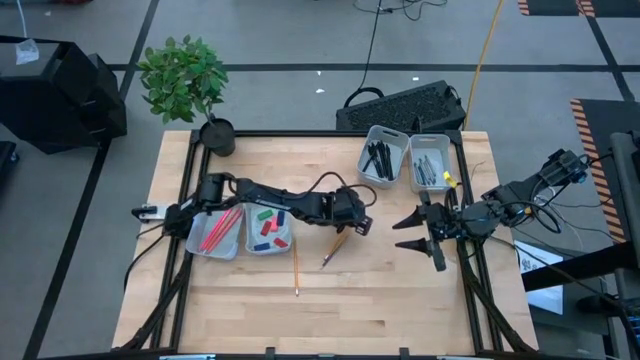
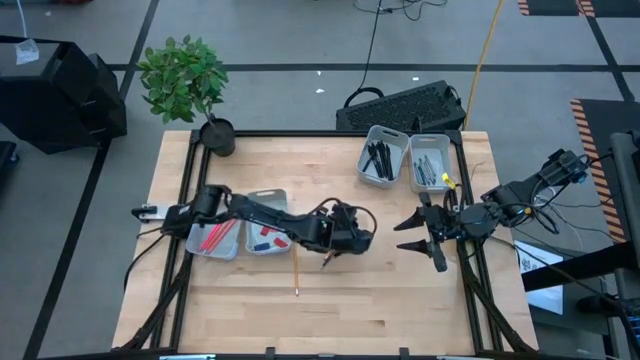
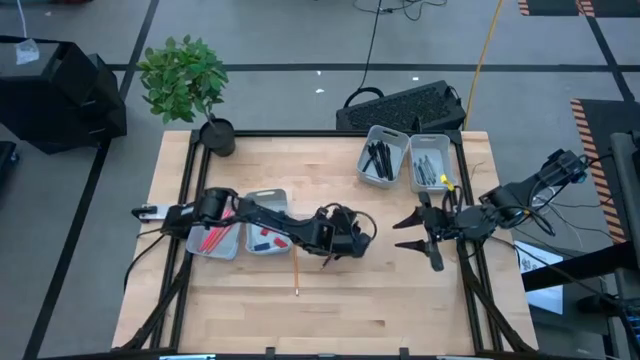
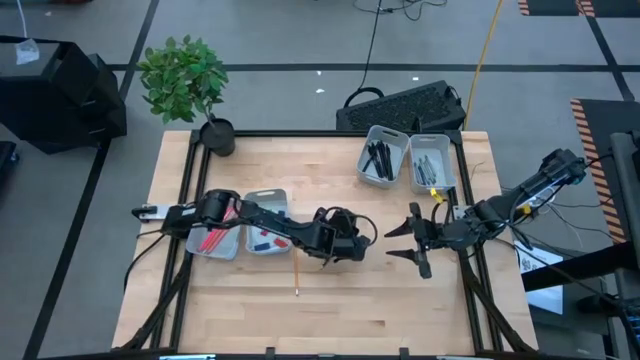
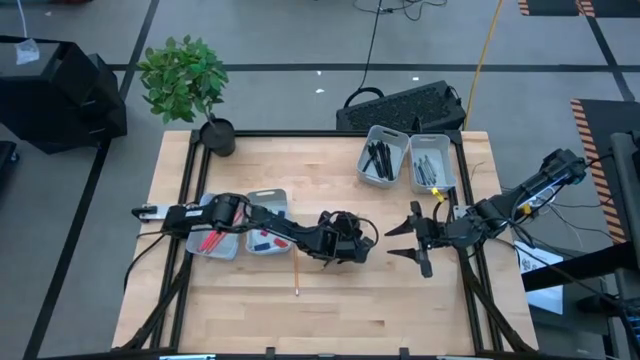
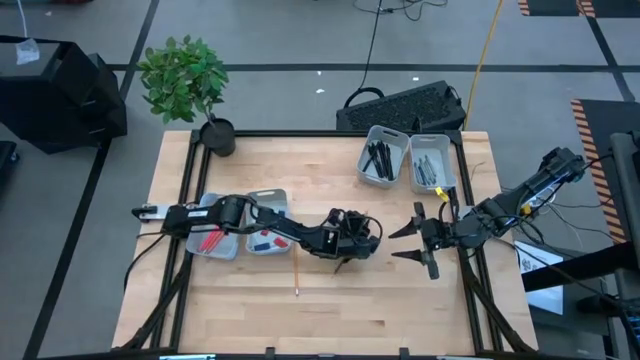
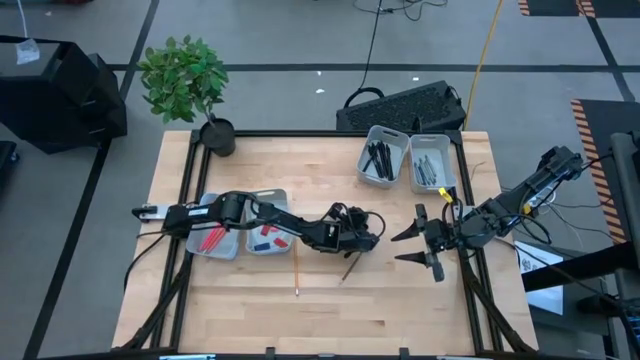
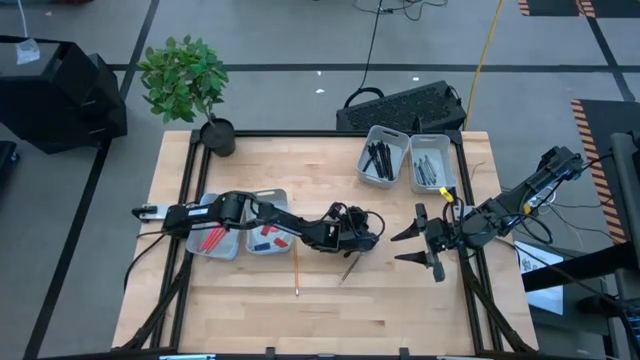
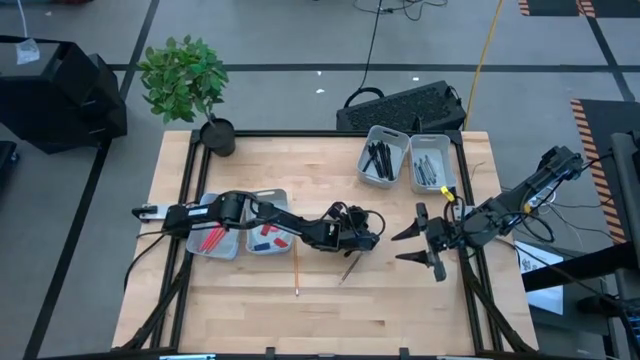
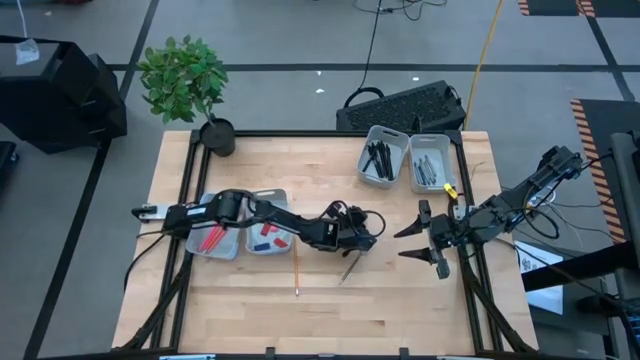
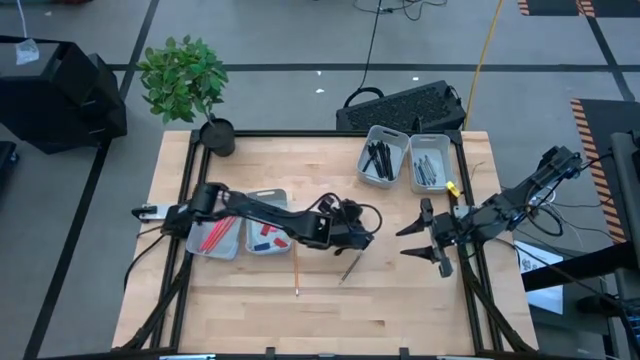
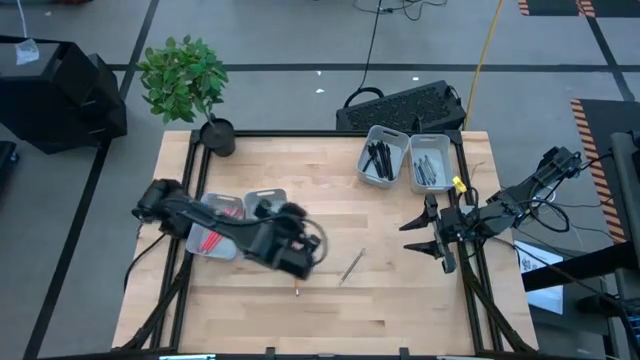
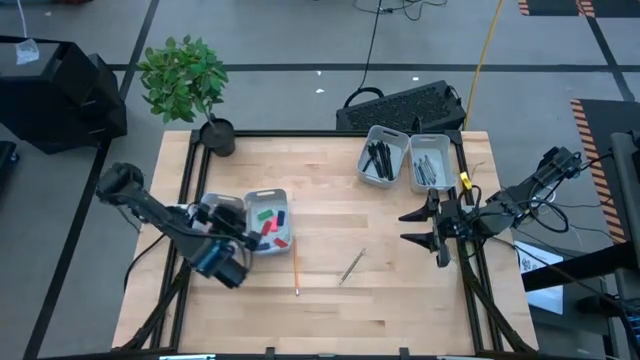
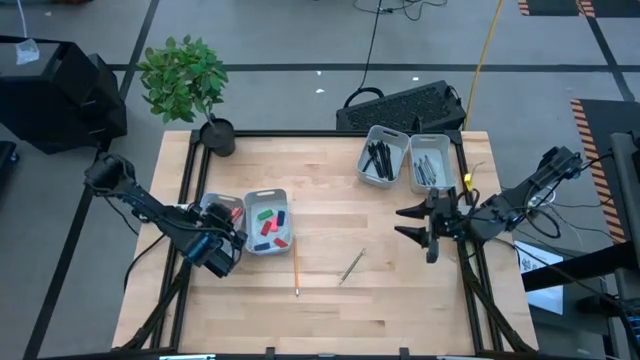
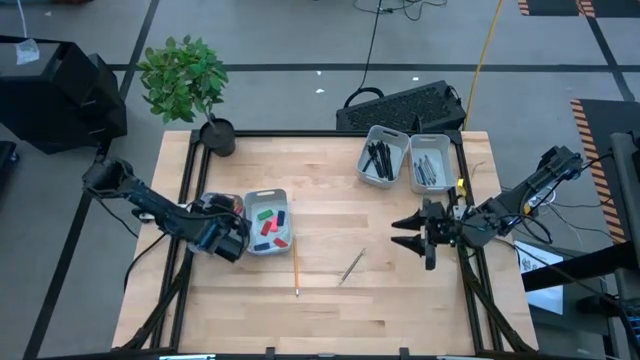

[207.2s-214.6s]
Task: Sort crayons/erasers/pens/pencils in bins
Put the yellow pencil into the bottom left gray bin

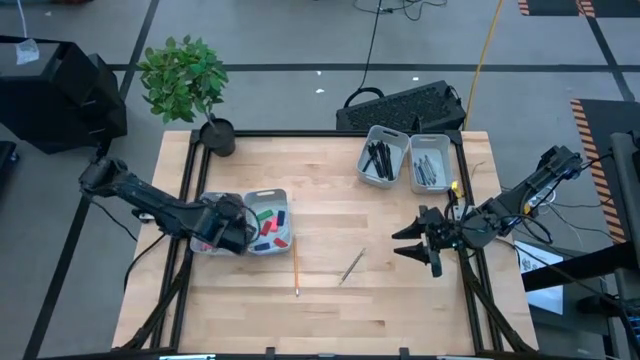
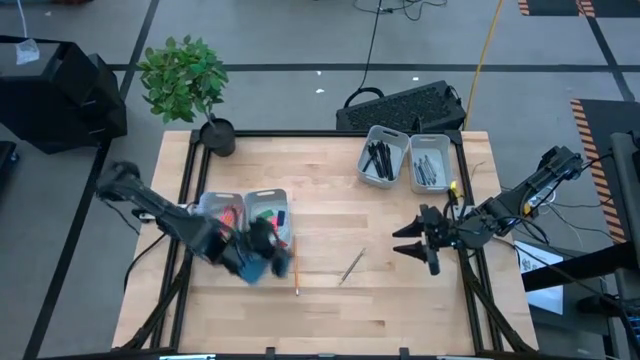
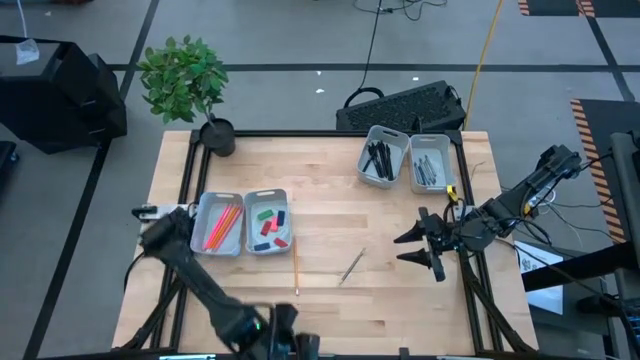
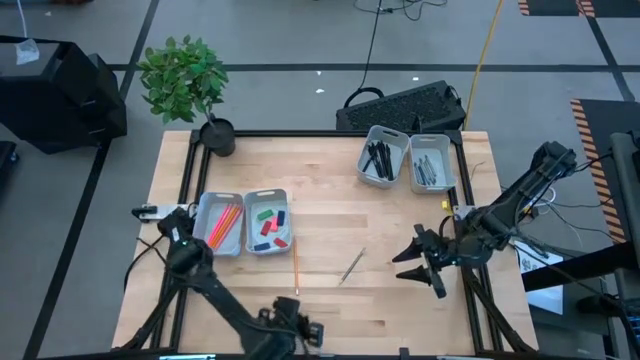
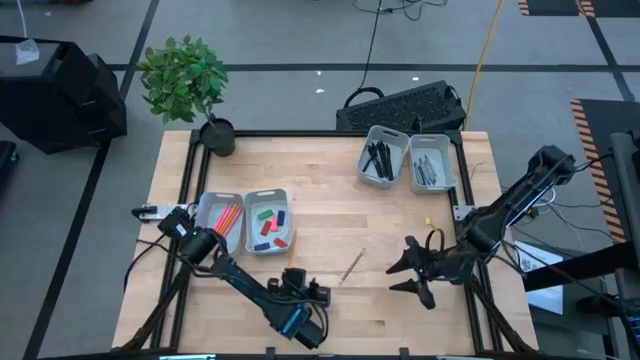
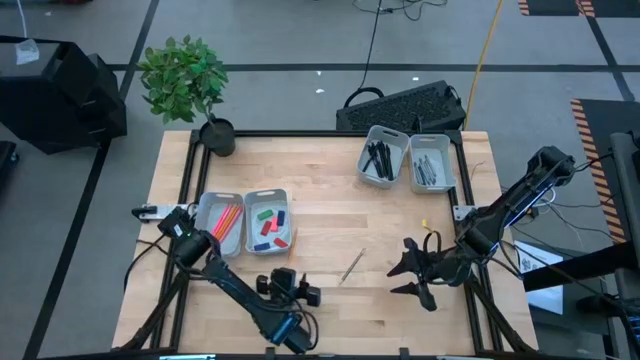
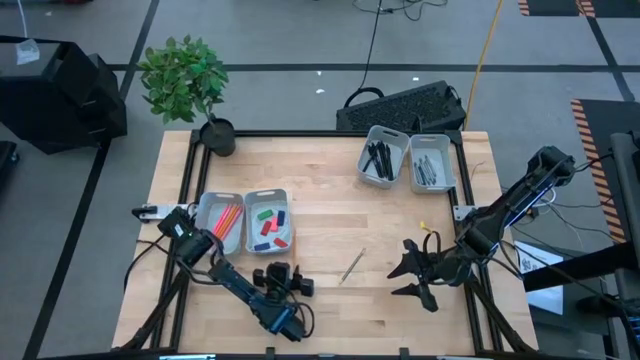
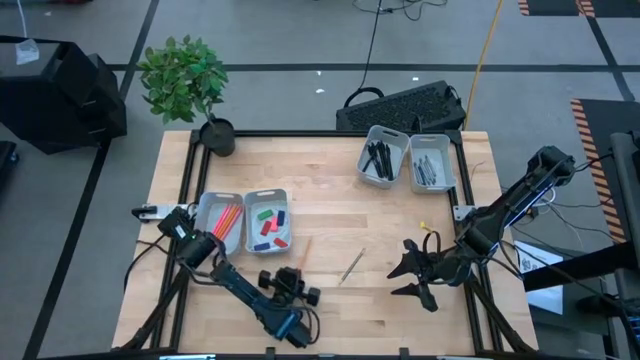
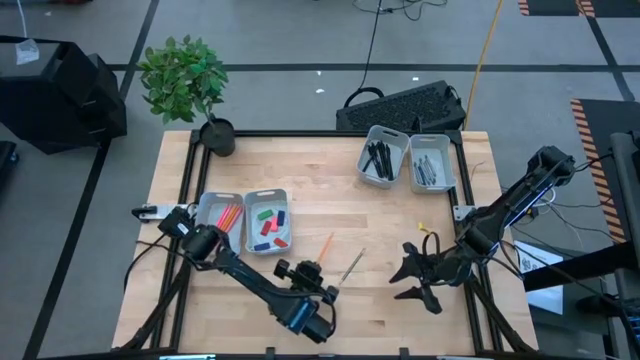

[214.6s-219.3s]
Put the yellow pencil into the bottom left gray bin

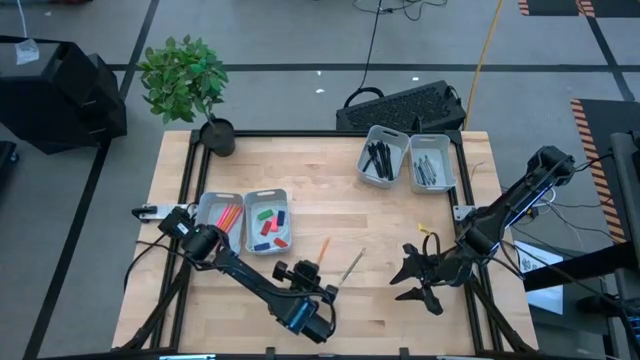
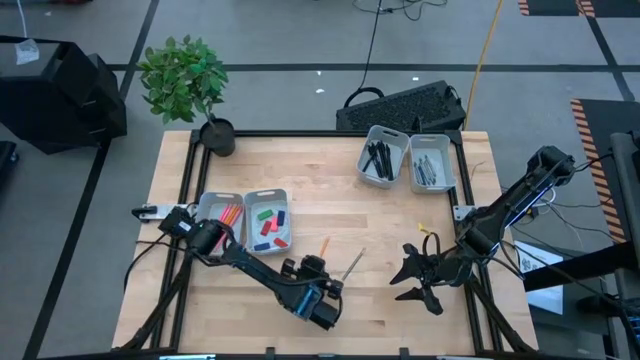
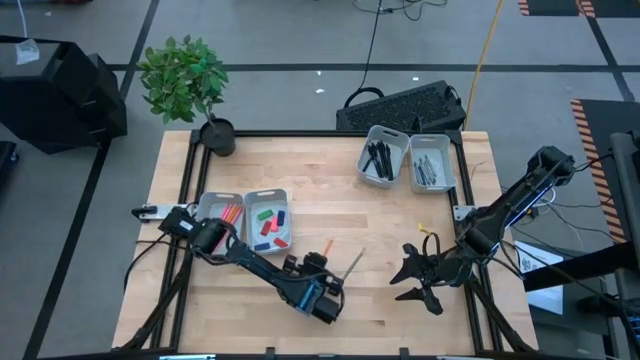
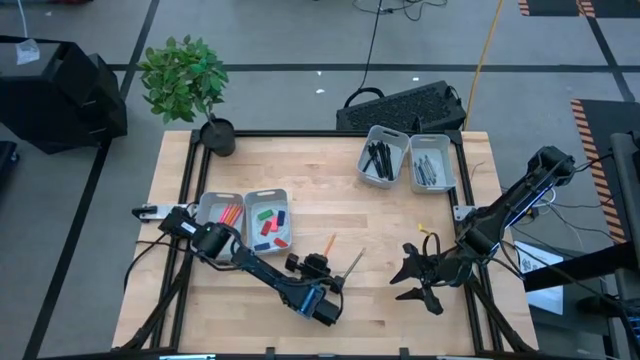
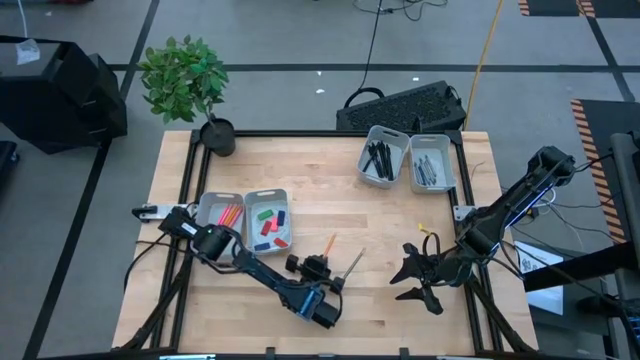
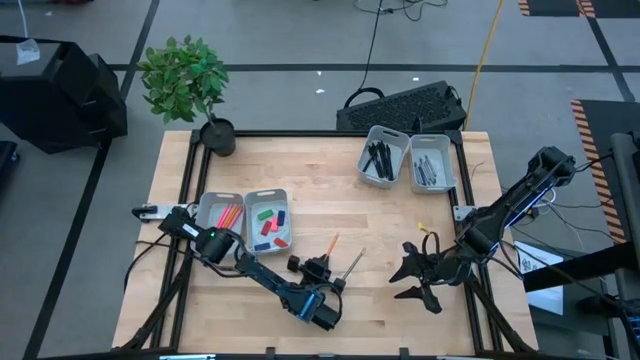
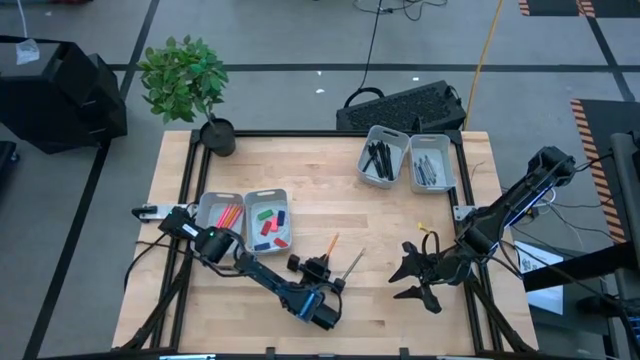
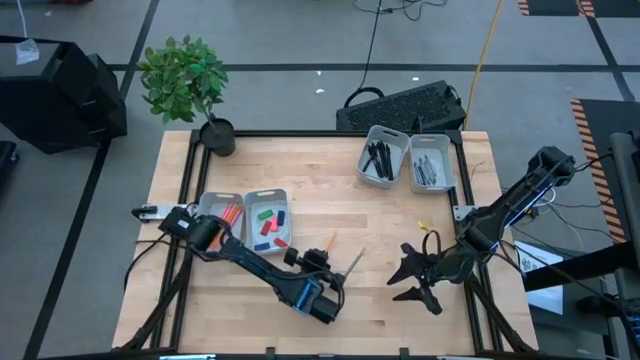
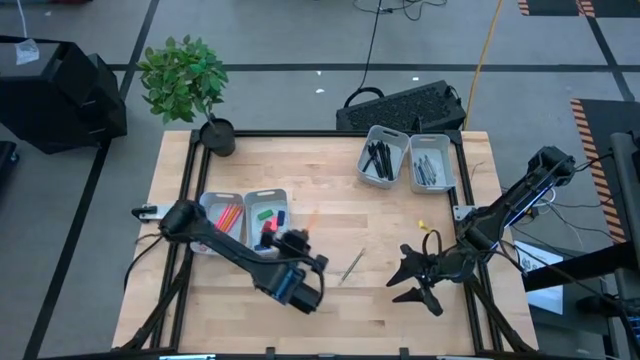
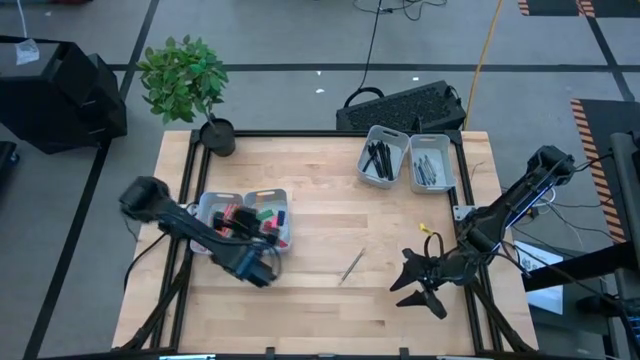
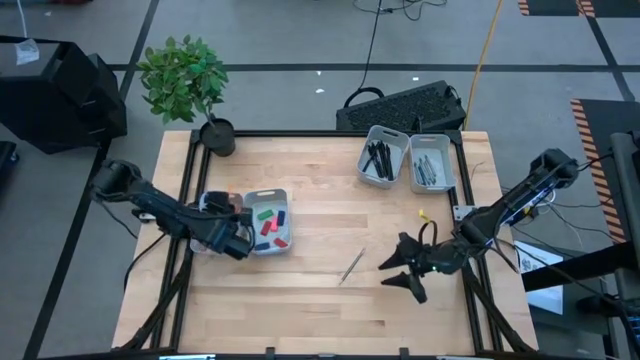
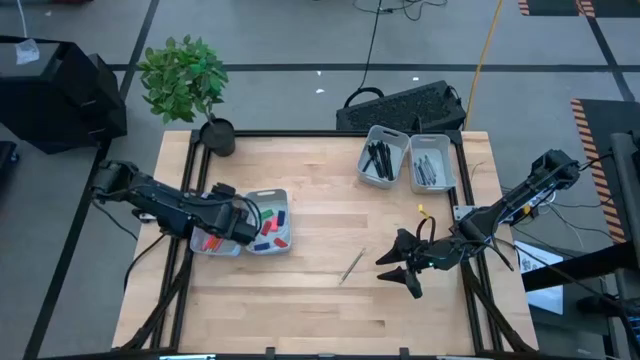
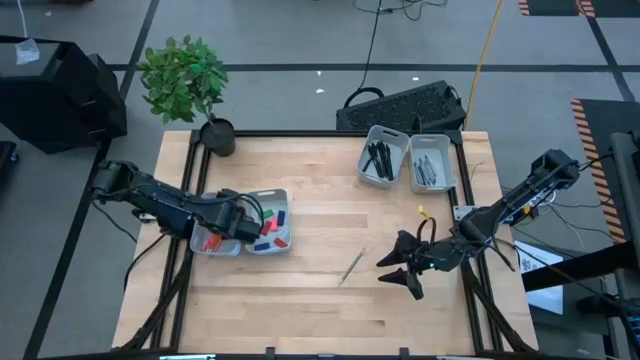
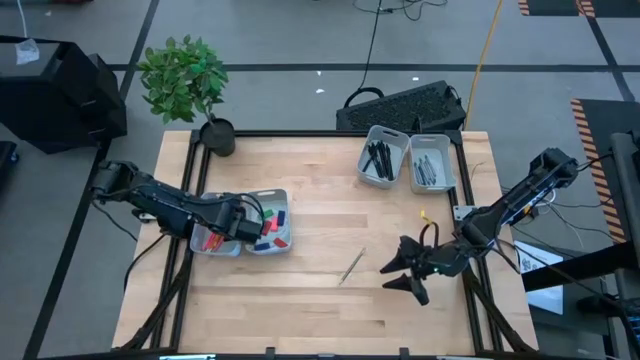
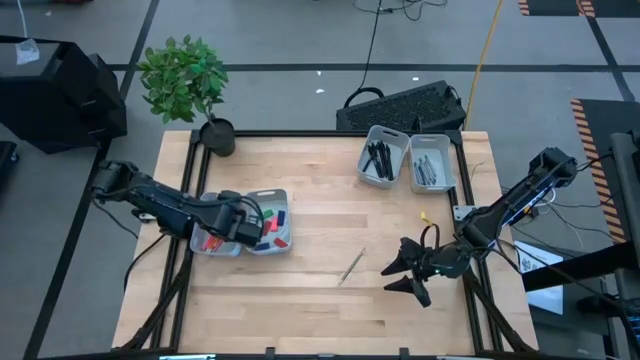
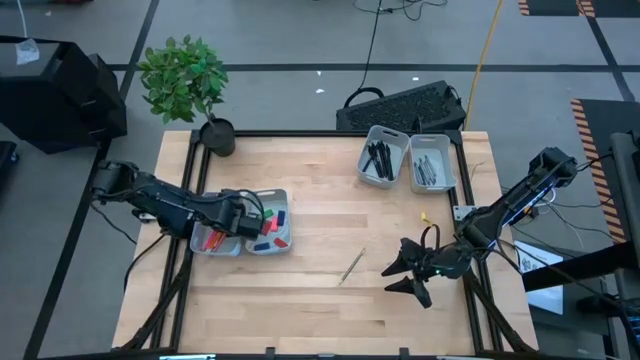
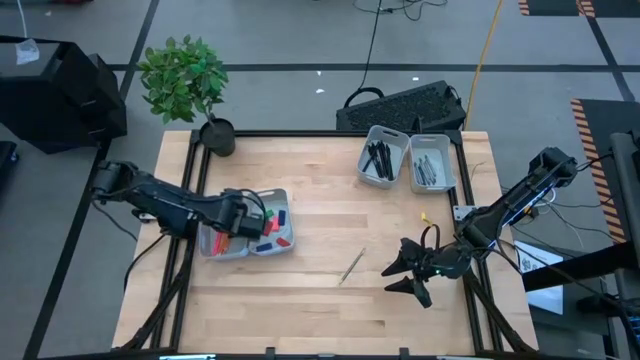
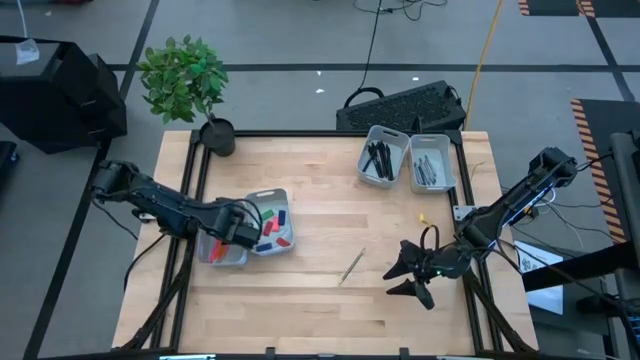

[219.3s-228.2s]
Put the yellow pencil into the bottom left gray bin

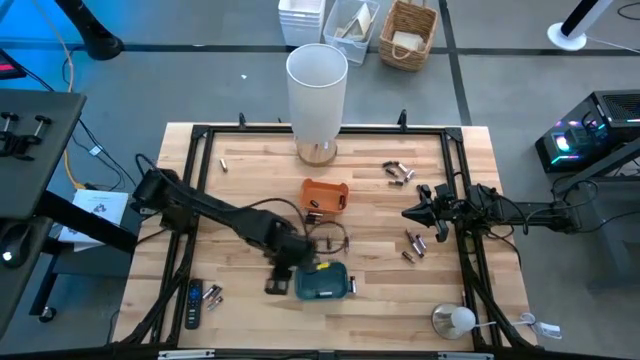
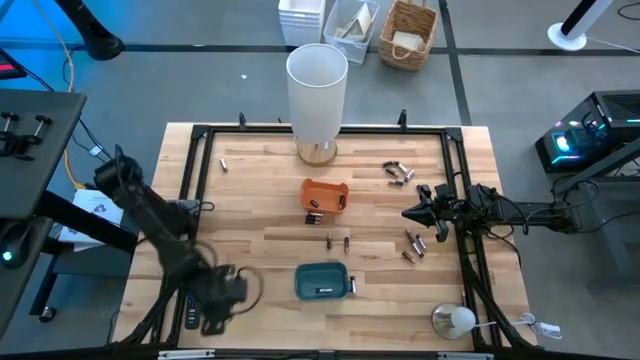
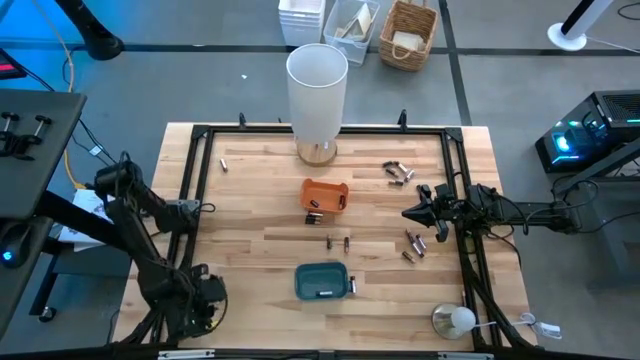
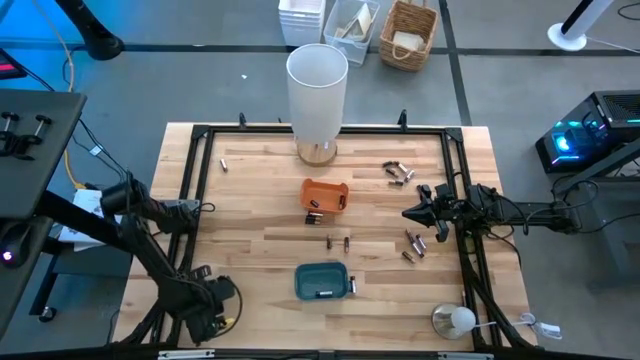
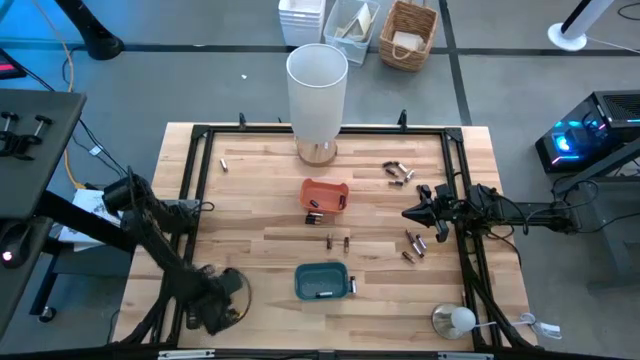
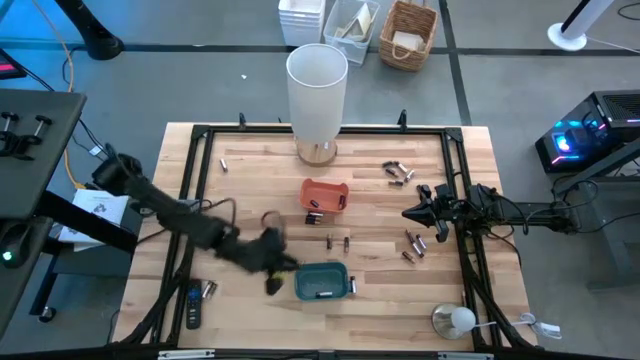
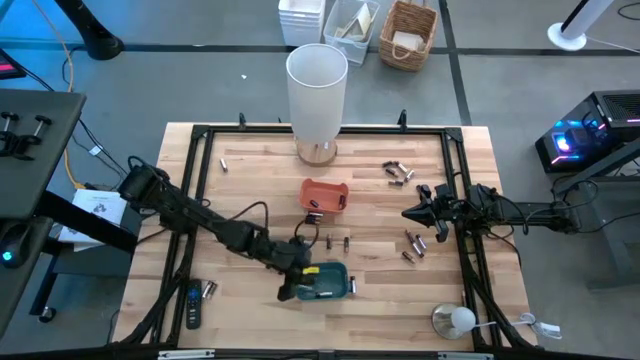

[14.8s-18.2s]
Task: Sort batteries
Put the silver battery into the blue bin
